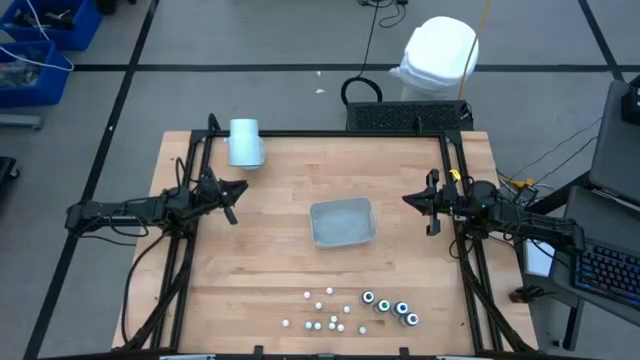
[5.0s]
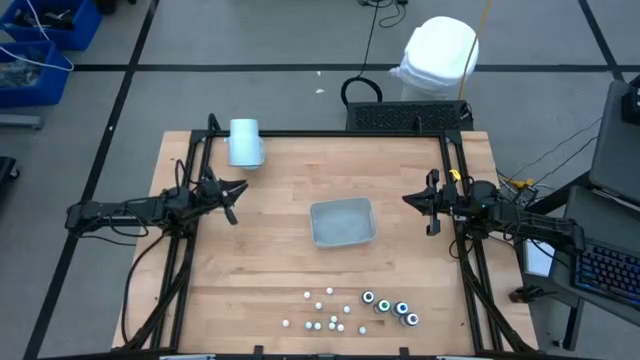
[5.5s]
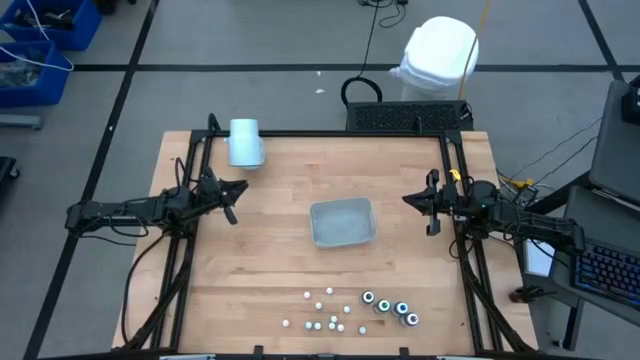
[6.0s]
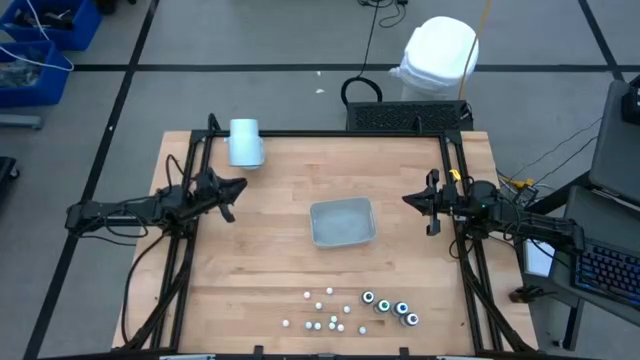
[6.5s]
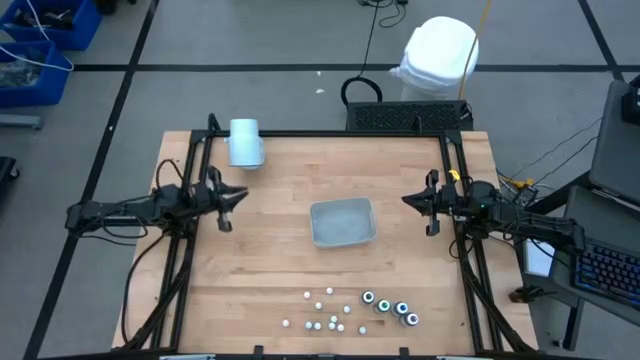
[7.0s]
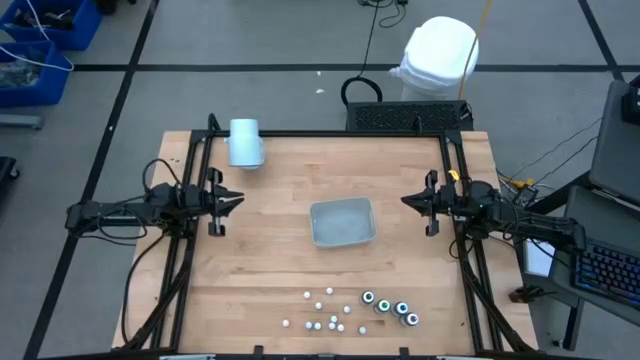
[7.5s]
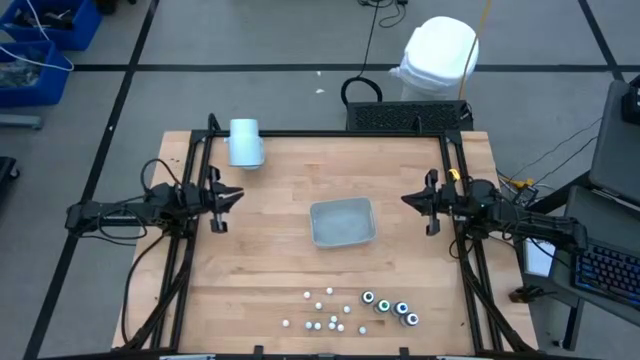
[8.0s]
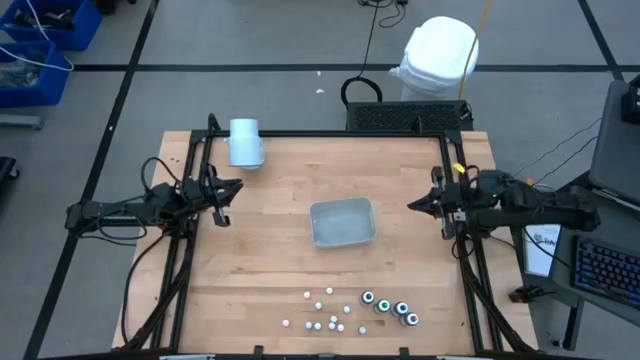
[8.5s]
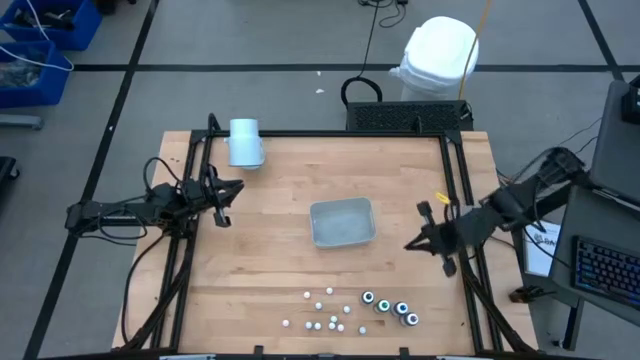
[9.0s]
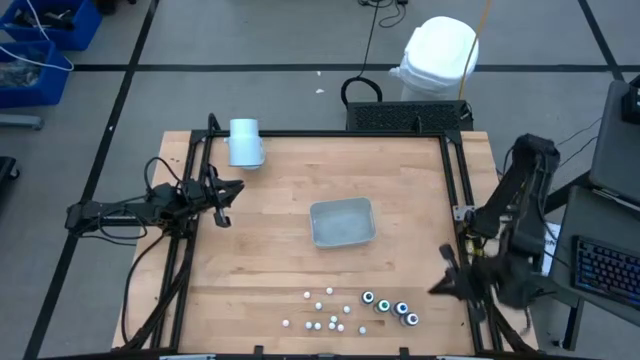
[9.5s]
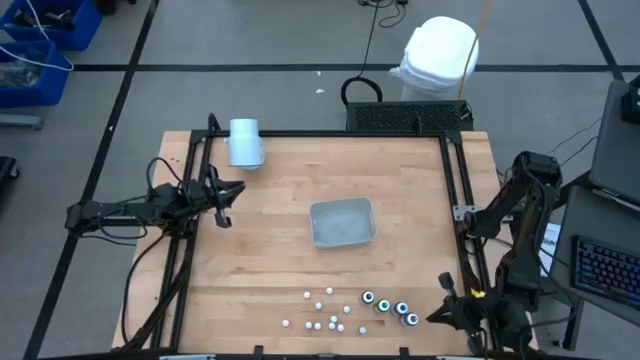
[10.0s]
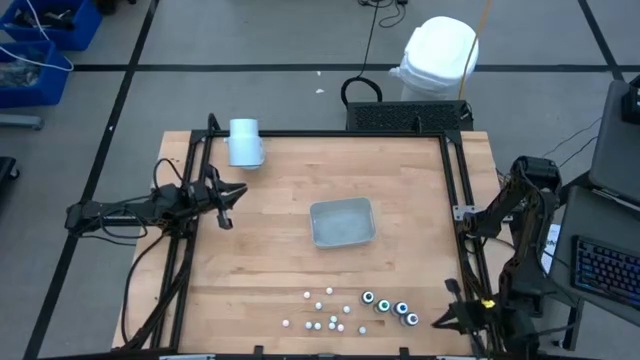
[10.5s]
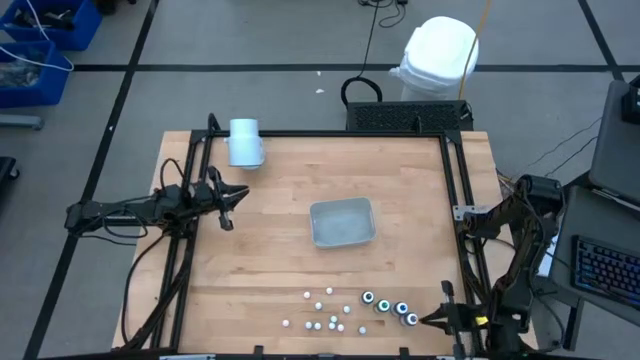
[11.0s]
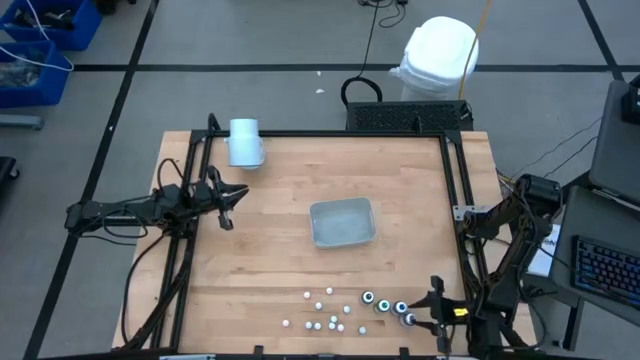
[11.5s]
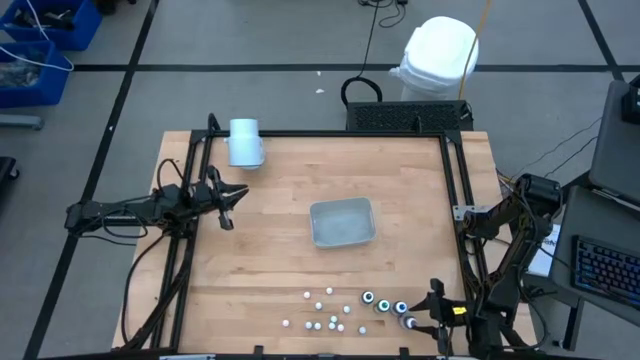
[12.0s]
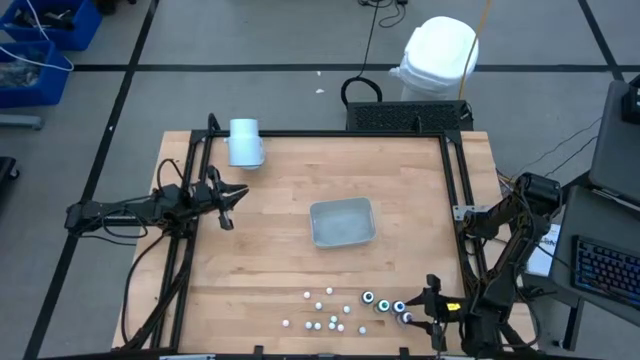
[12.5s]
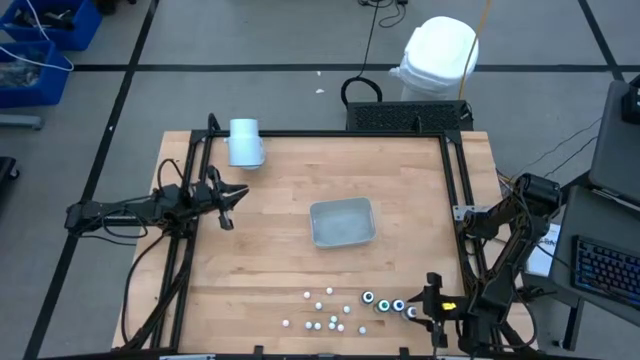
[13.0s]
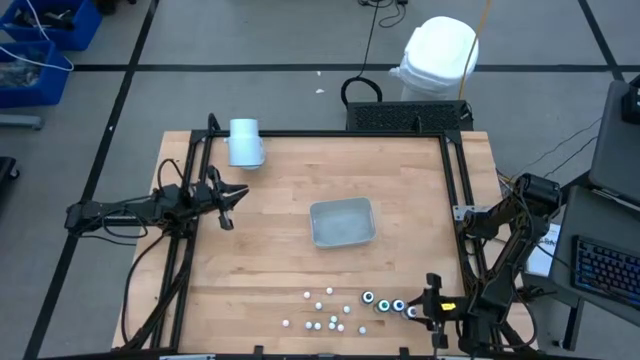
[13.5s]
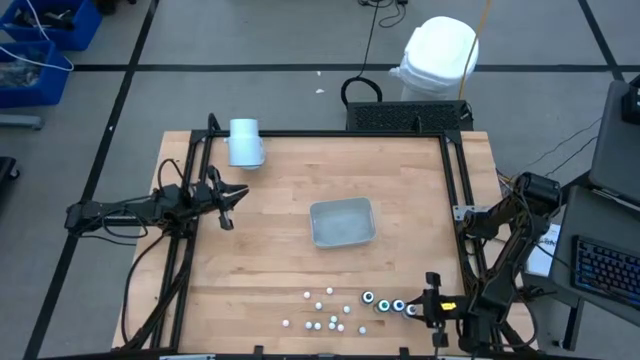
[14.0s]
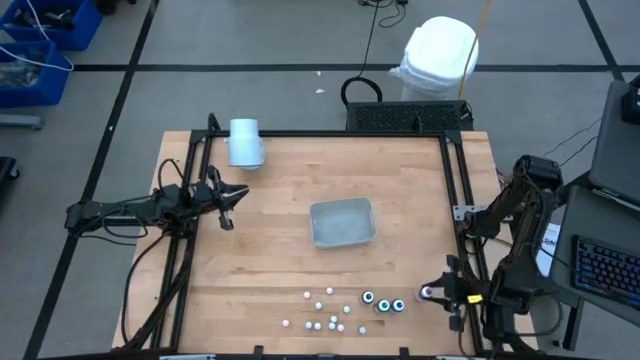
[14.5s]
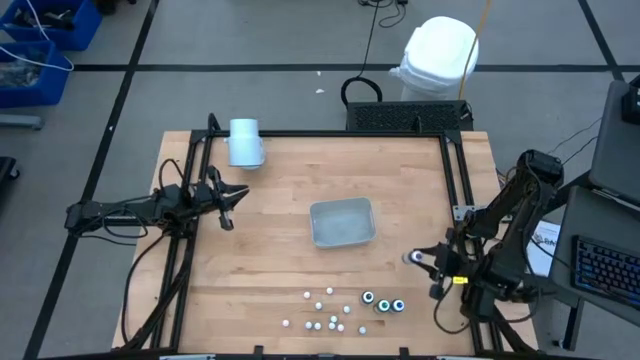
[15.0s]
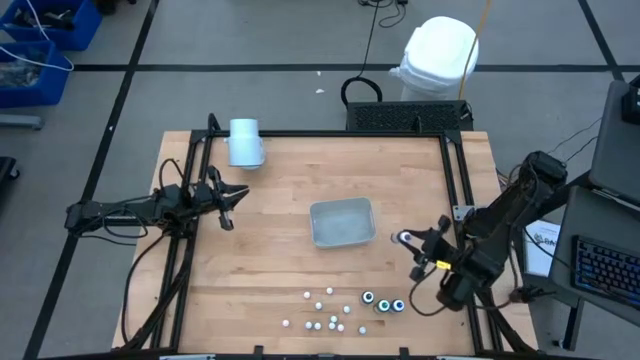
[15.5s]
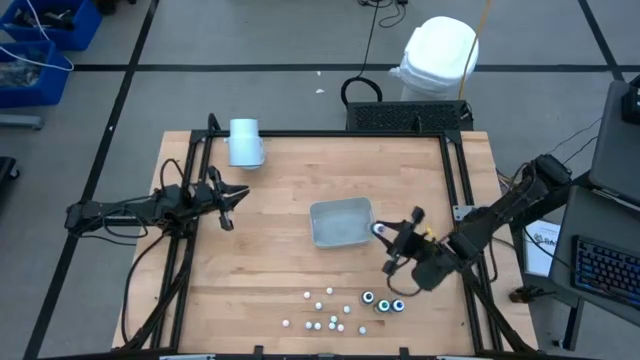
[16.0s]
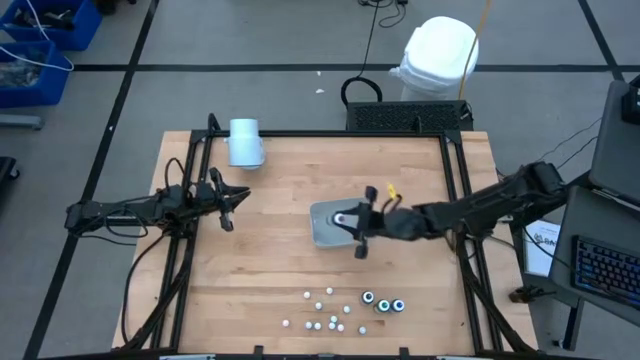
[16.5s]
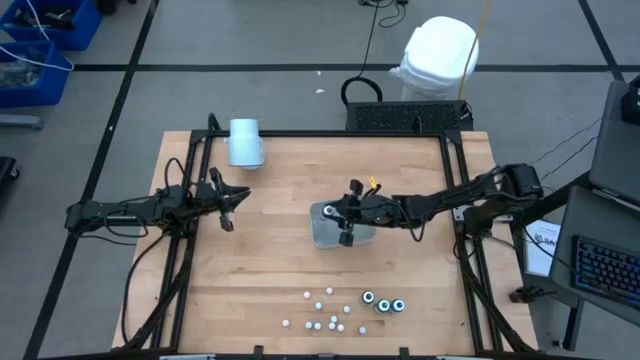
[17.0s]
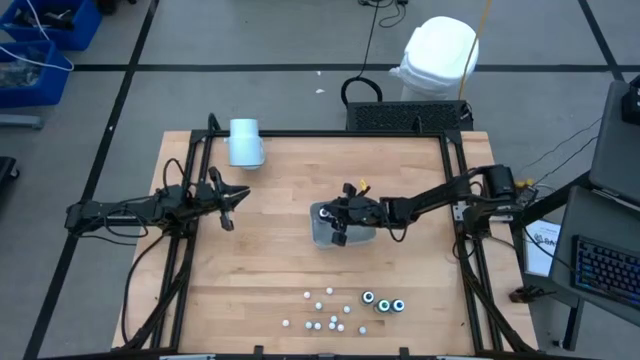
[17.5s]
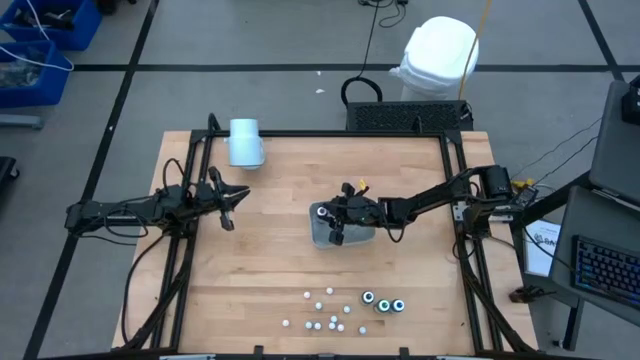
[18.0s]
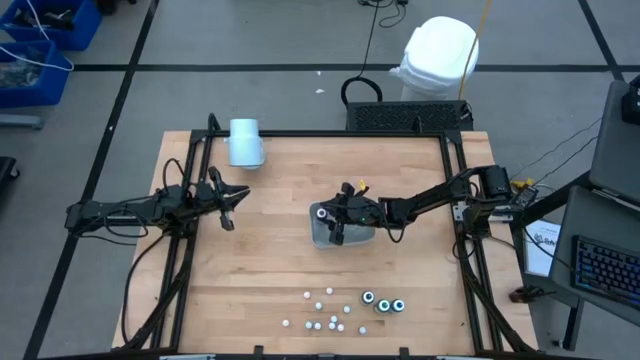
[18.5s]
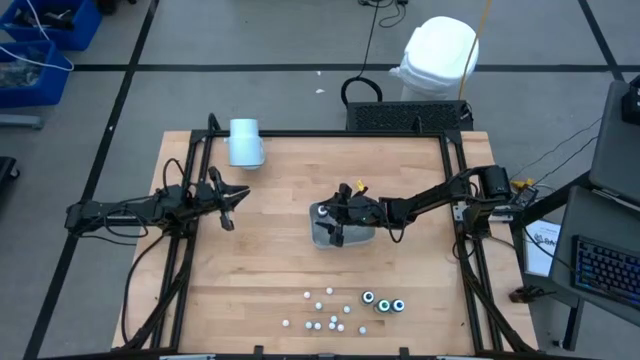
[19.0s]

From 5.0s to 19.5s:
Task: Pick & Place food coloring
Put the large purple food coloring bottle into the gray bin
